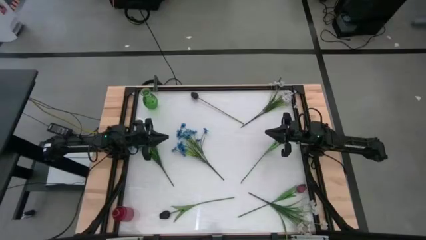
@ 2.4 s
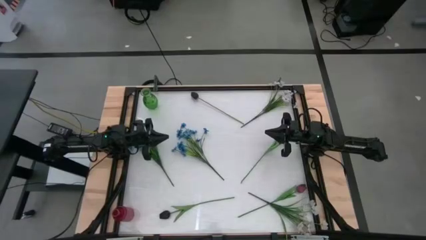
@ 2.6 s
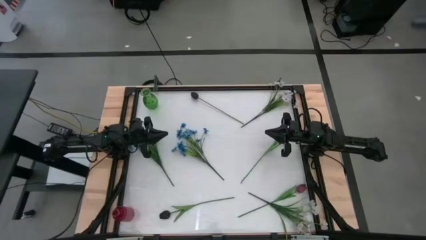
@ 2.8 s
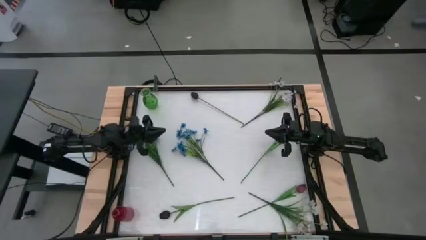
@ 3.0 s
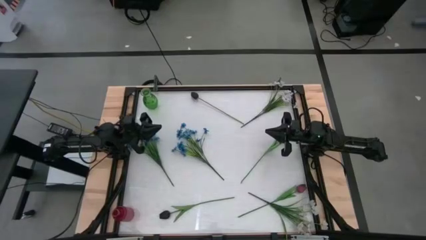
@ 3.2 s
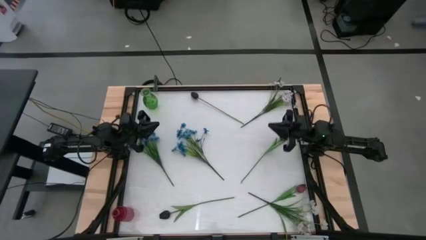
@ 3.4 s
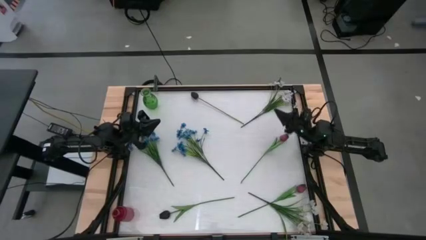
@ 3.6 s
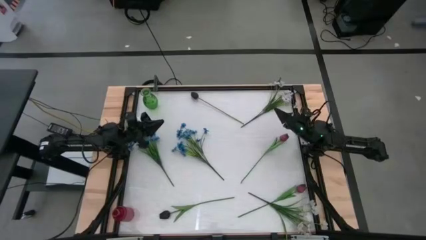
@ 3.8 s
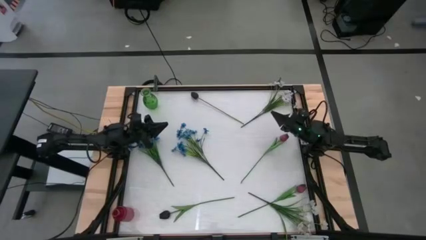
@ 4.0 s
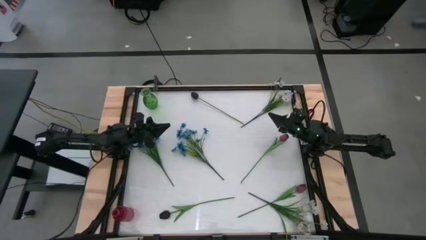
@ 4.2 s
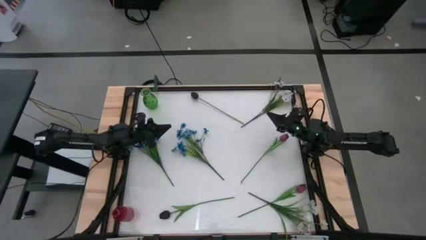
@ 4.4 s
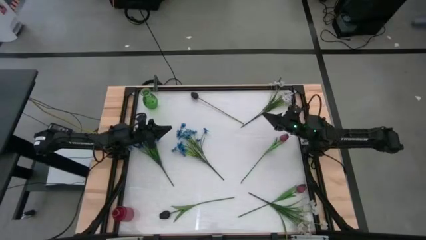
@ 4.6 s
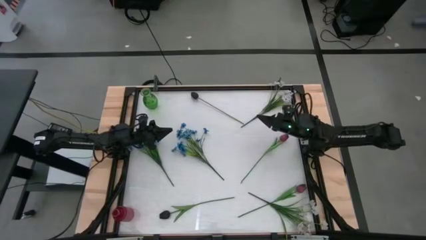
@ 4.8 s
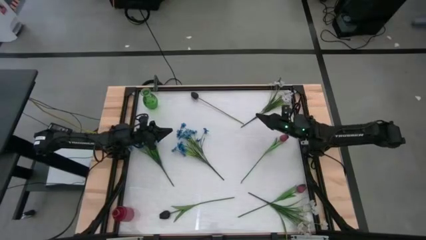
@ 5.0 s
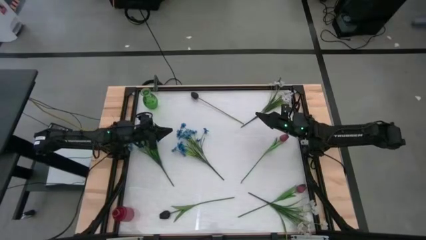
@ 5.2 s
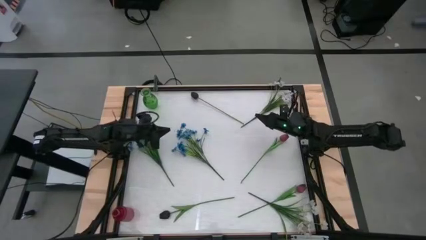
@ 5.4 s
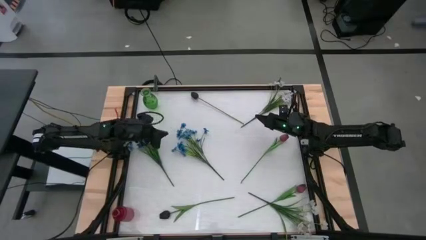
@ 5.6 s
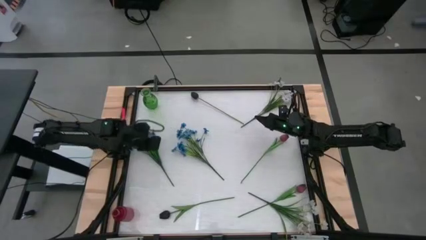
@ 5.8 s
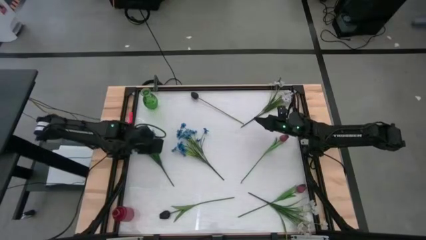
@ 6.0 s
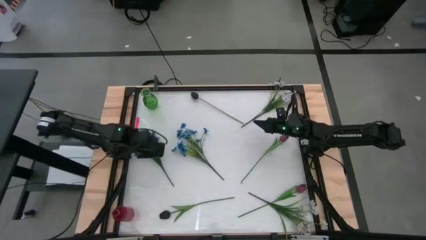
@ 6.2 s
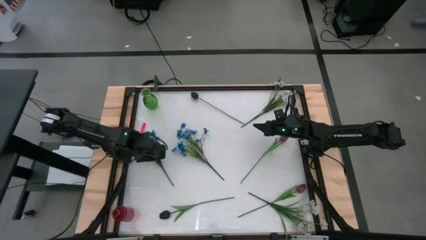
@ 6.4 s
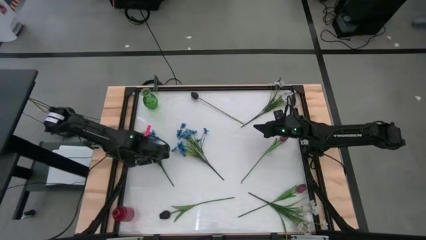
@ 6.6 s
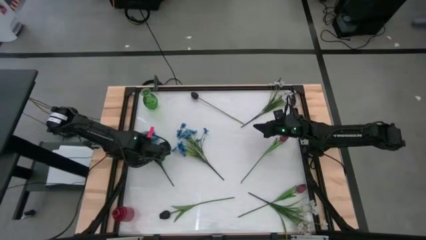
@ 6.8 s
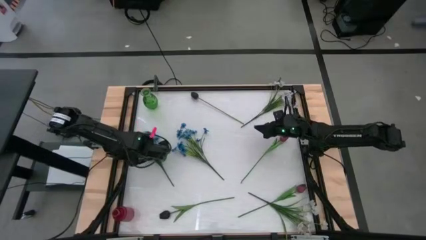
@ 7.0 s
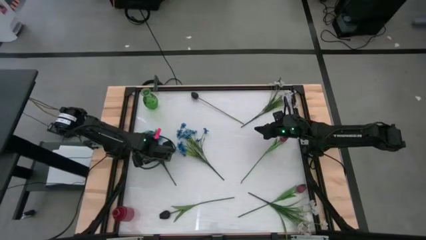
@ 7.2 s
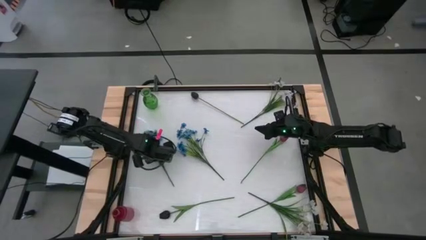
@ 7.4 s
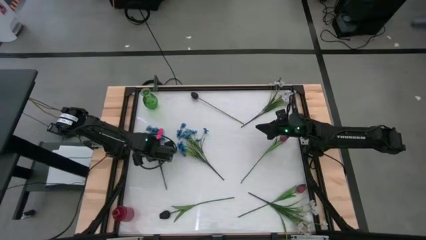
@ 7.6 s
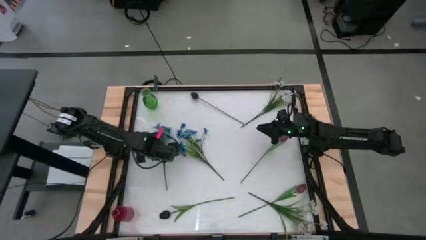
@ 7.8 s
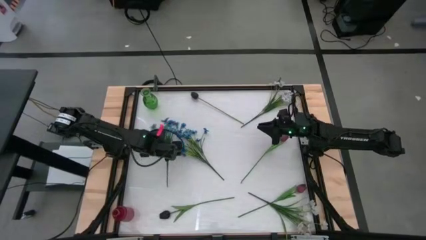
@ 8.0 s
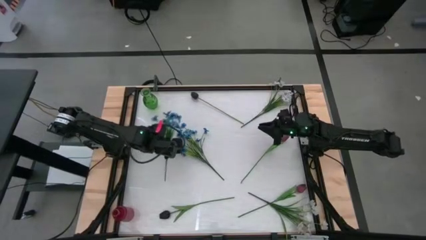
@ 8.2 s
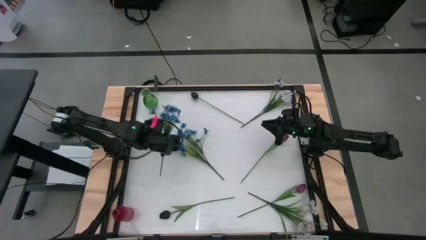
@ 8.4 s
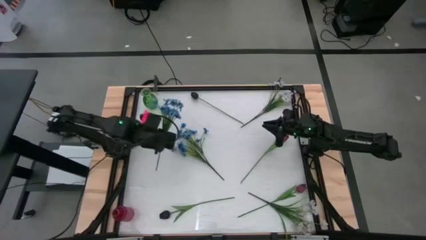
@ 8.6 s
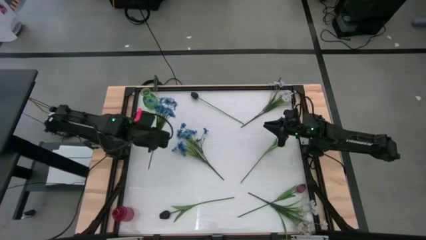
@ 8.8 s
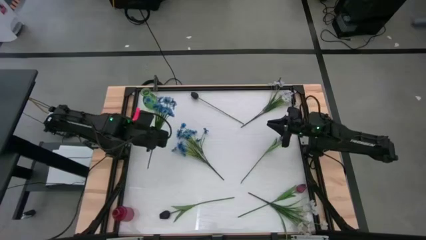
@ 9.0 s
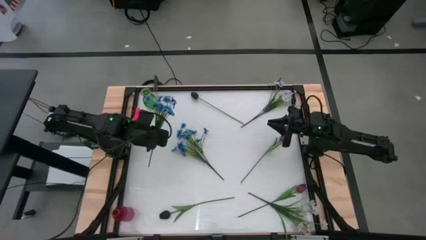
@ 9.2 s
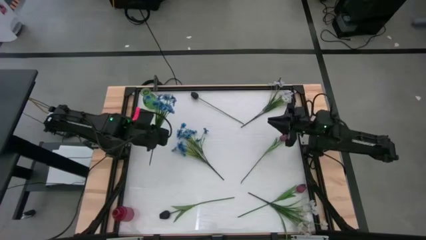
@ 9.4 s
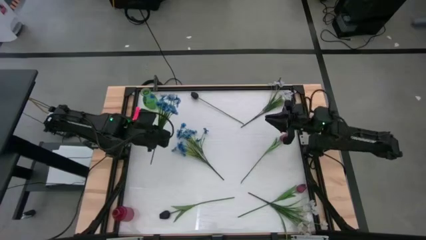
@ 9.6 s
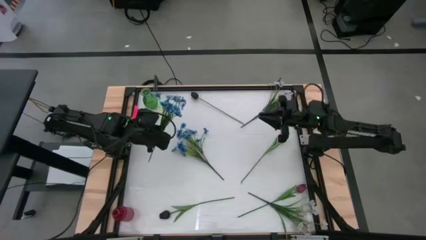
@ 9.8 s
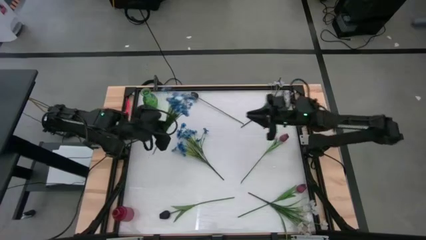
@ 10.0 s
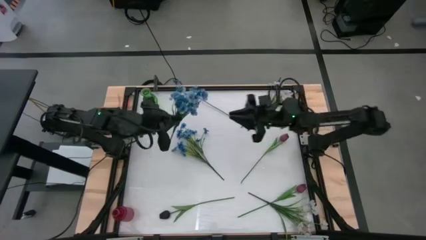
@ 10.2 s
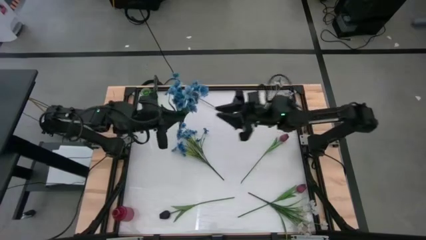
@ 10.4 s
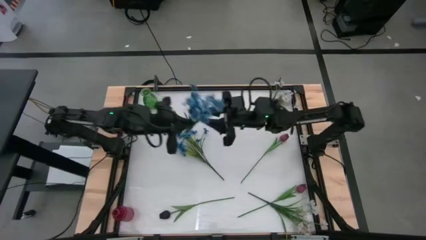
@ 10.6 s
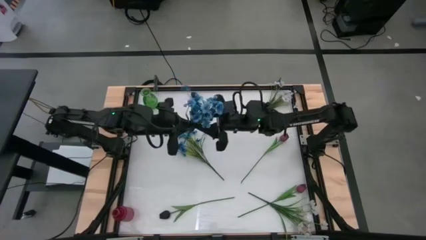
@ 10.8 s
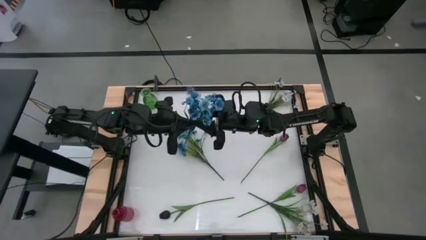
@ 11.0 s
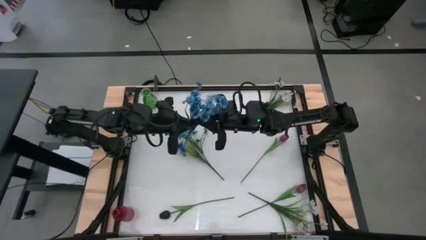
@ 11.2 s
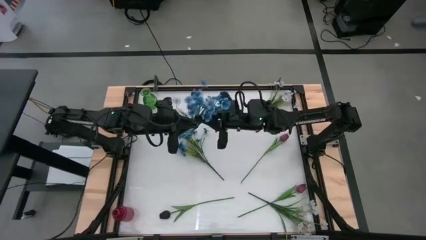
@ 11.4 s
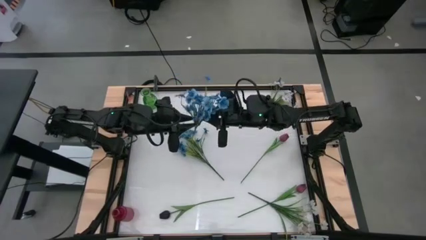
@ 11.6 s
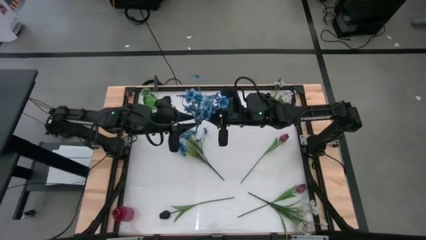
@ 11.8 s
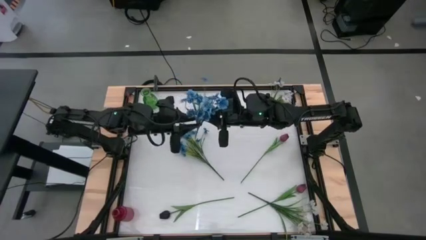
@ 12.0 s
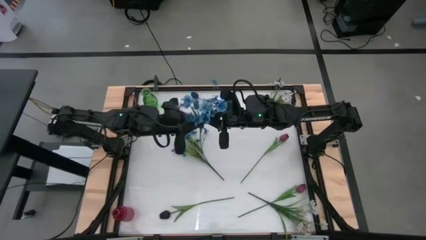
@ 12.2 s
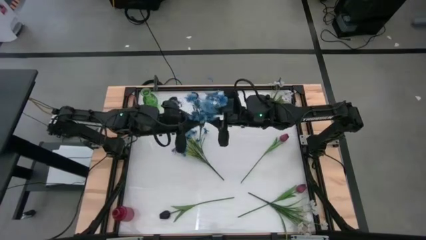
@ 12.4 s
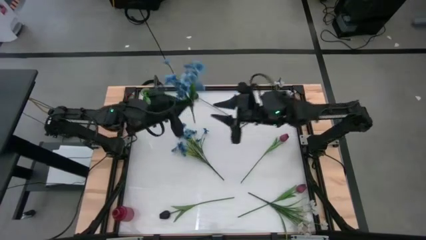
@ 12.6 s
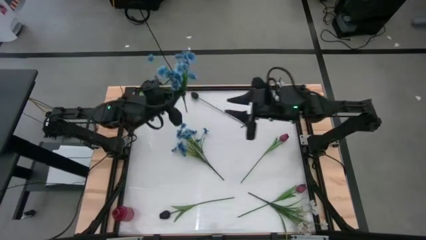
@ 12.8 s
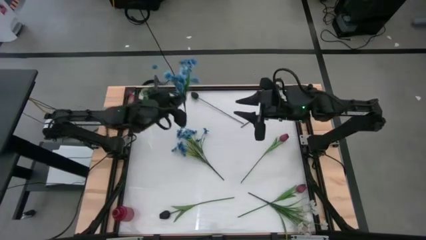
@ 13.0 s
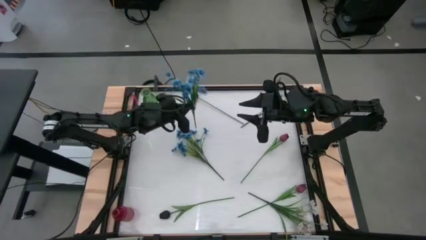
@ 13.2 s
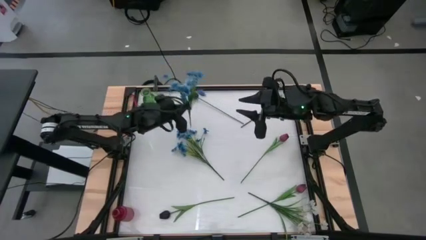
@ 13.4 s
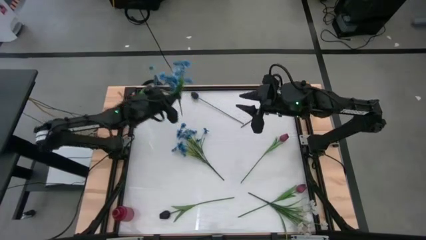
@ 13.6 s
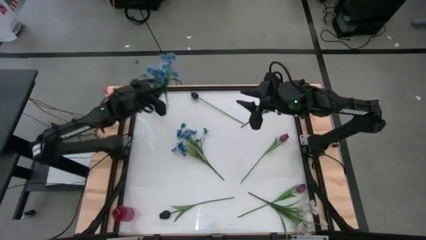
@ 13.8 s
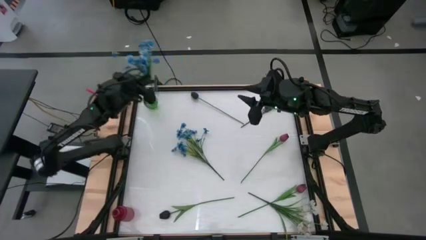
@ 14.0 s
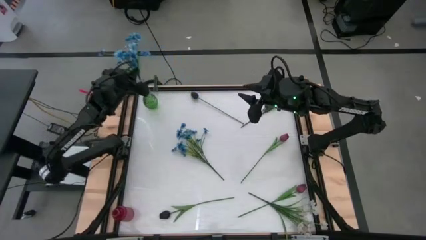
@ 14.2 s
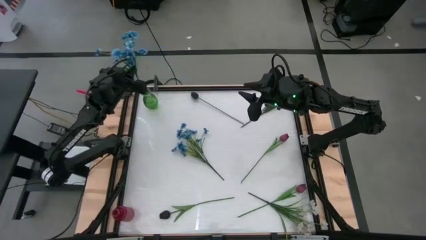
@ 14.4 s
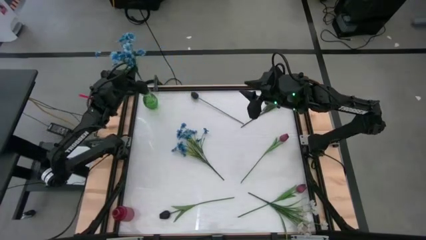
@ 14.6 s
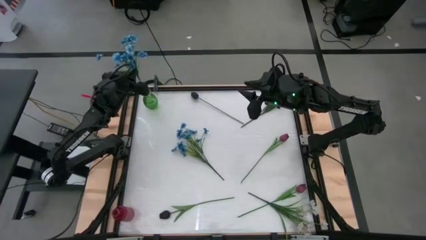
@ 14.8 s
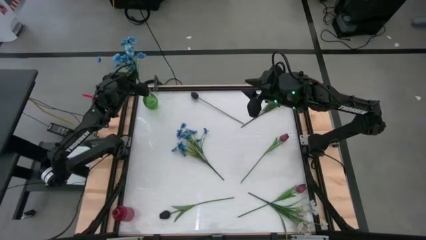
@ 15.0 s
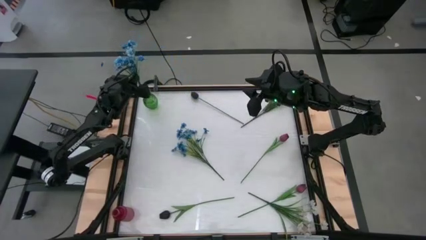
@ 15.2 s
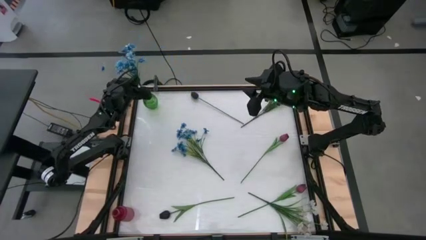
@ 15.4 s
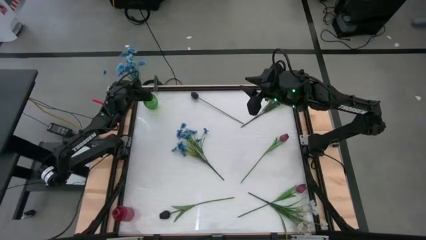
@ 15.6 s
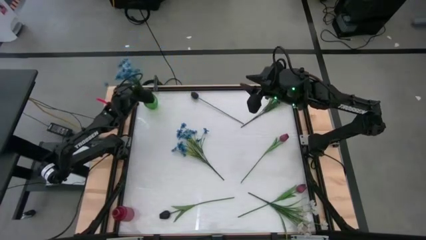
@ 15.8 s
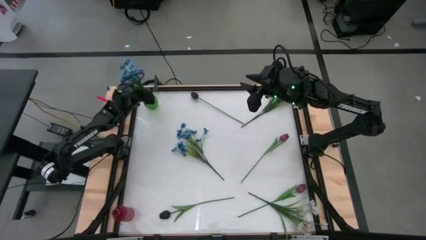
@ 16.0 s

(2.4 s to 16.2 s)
Task: Sort flowers into vase by color
Put the left blue flowers into the green vase

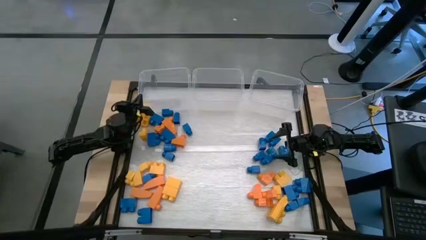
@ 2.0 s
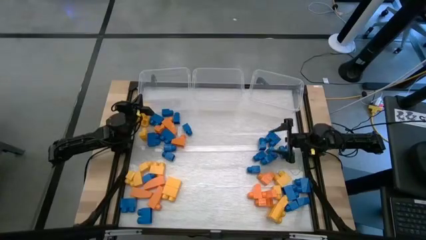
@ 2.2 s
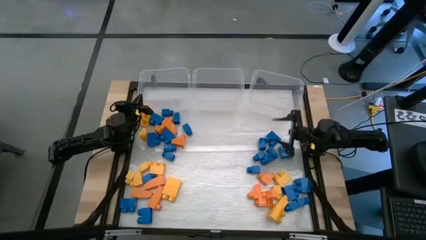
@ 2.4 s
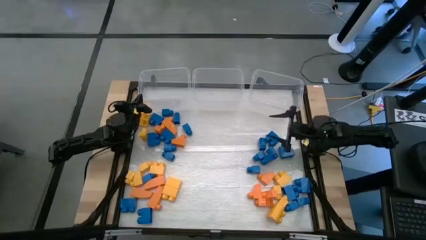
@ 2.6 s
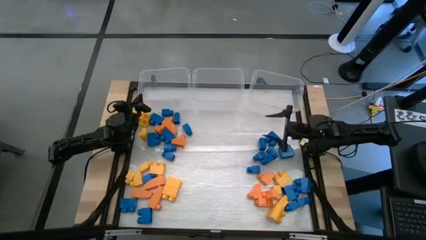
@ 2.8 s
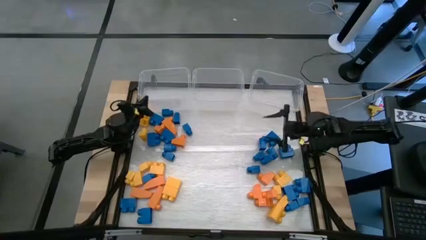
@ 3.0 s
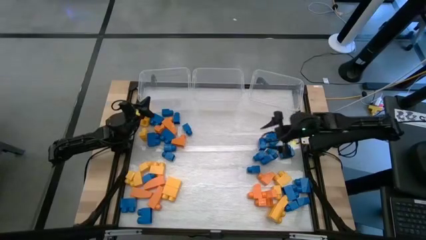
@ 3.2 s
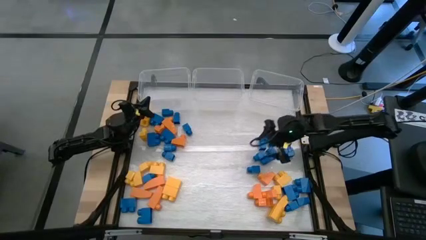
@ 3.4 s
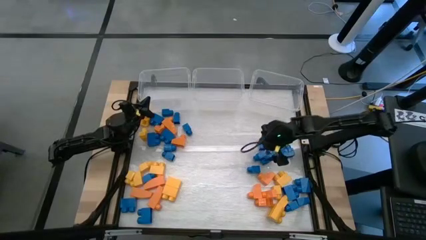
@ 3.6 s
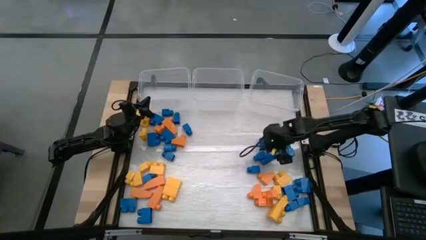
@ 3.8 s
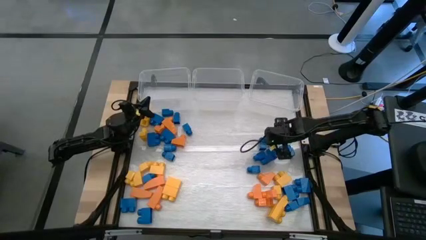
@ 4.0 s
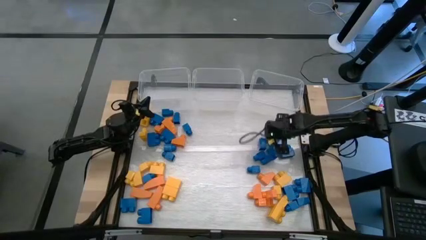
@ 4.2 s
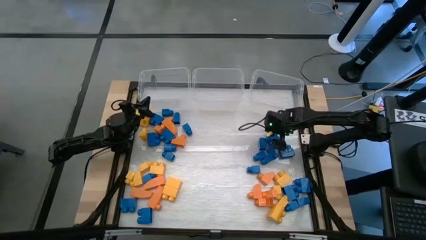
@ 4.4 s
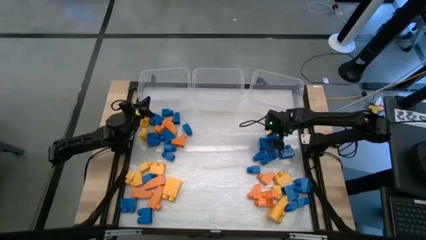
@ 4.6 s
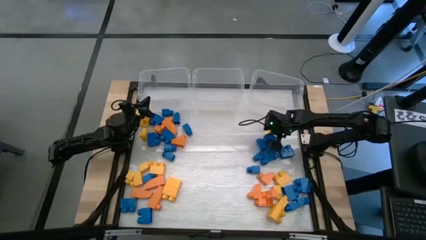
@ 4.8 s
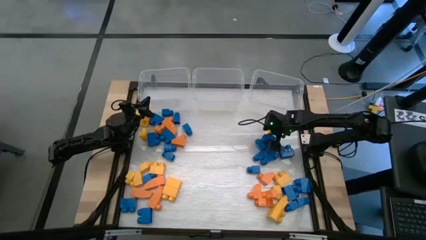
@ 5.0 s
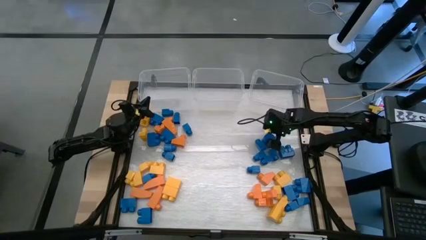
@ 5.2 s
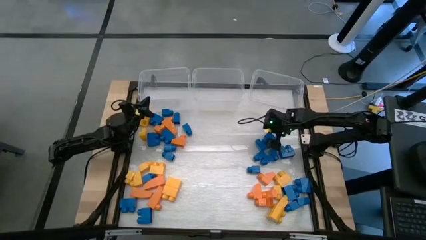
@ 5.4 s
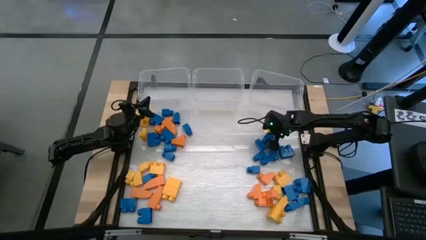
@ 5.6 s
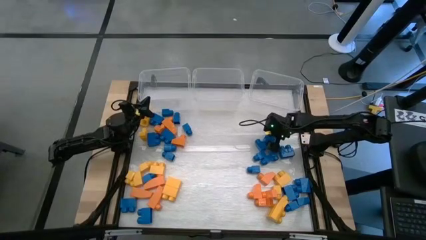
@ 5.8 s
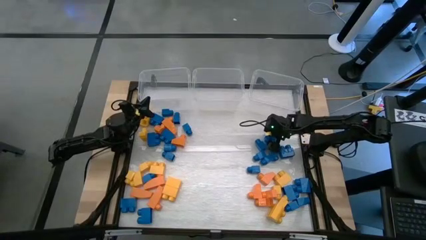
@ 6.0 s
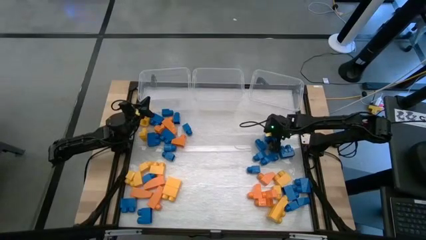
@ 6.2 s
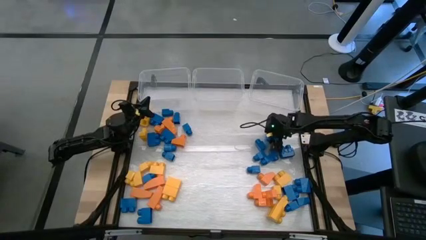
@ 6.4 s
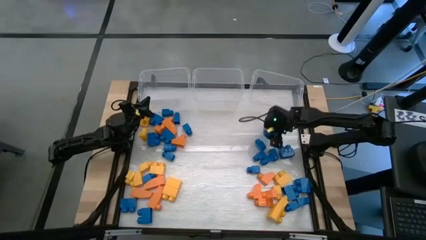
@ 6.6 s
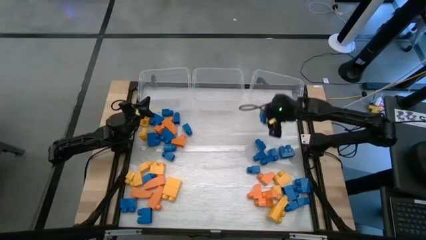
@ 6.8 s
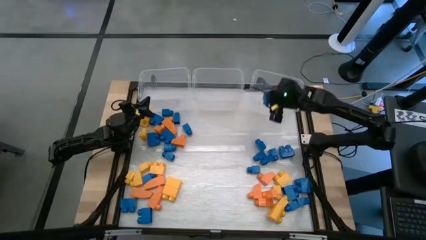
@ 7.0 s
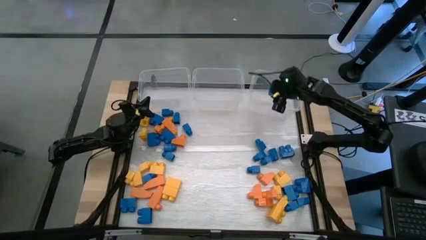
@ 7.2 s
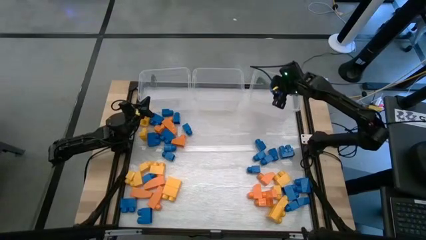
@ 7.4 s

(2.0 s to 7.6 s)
Task: Sort blocks
Put the blue game piece into the right transparent bin
